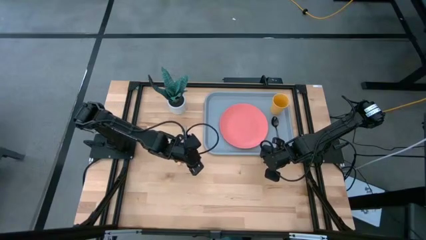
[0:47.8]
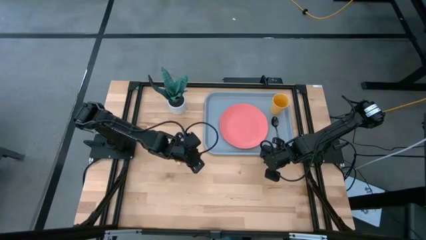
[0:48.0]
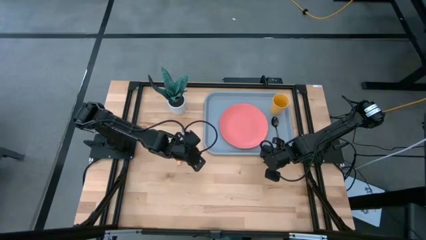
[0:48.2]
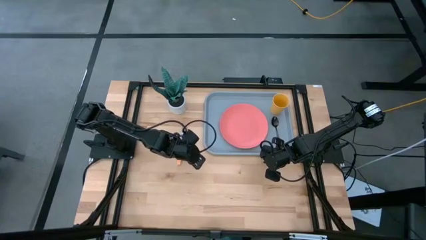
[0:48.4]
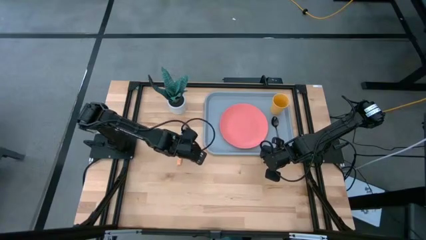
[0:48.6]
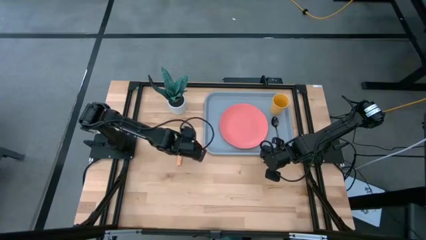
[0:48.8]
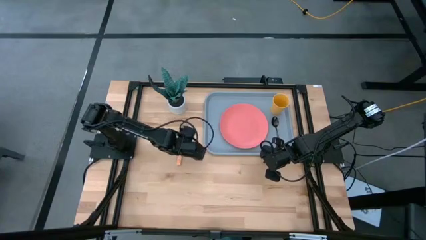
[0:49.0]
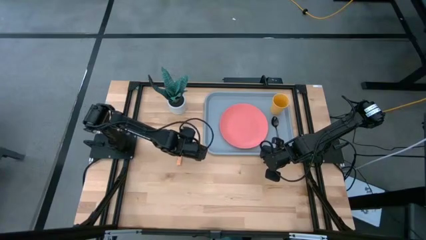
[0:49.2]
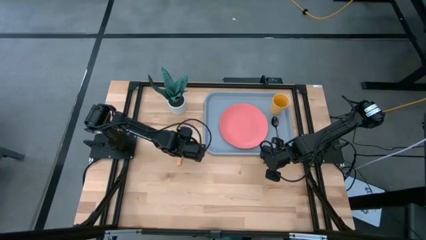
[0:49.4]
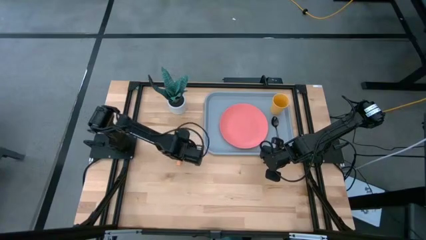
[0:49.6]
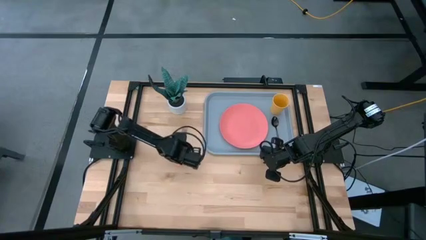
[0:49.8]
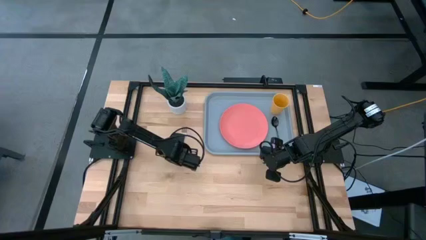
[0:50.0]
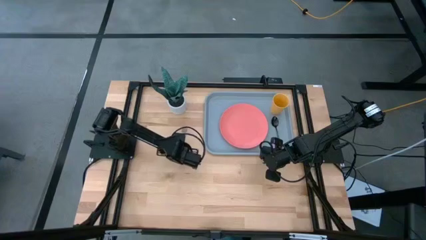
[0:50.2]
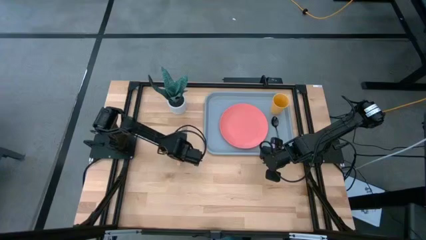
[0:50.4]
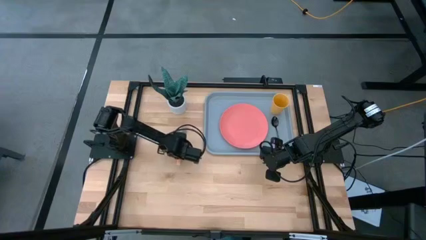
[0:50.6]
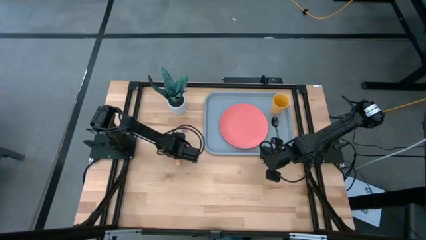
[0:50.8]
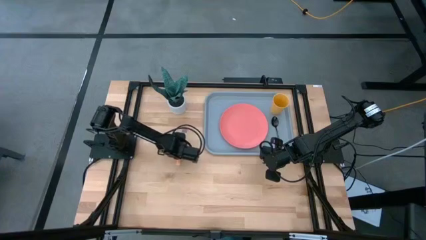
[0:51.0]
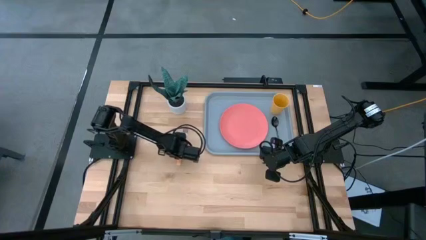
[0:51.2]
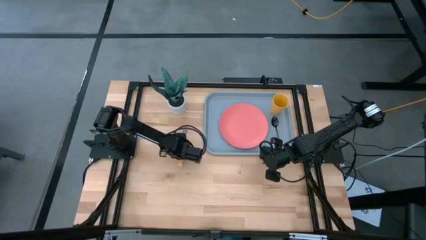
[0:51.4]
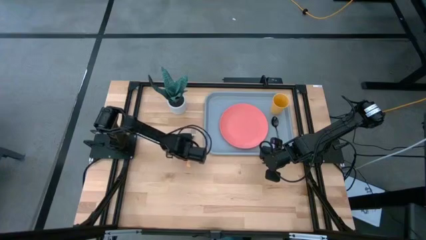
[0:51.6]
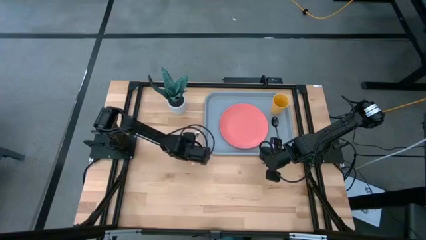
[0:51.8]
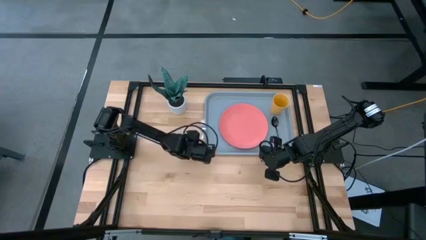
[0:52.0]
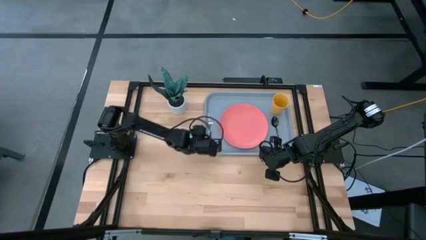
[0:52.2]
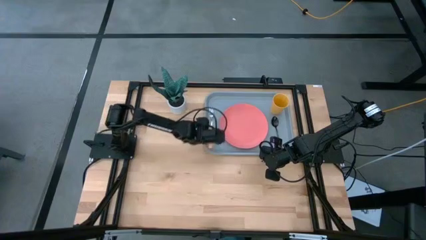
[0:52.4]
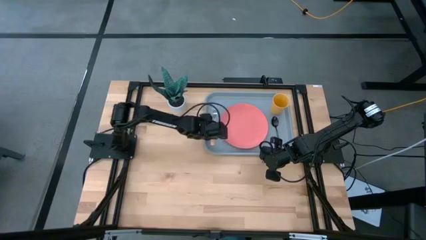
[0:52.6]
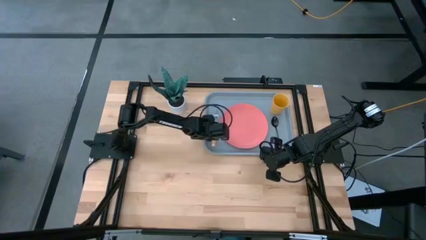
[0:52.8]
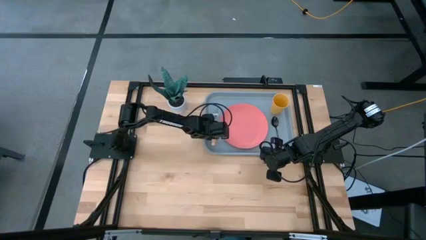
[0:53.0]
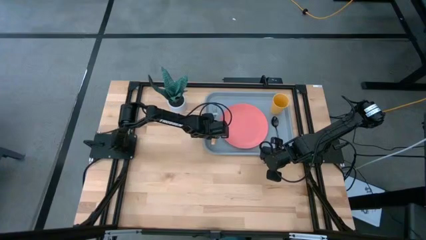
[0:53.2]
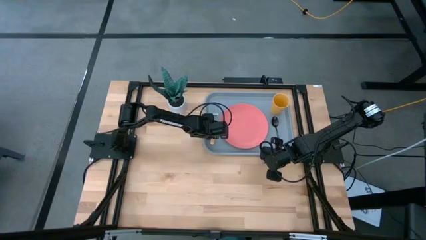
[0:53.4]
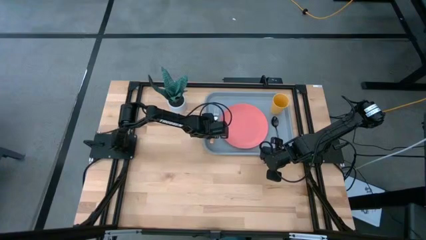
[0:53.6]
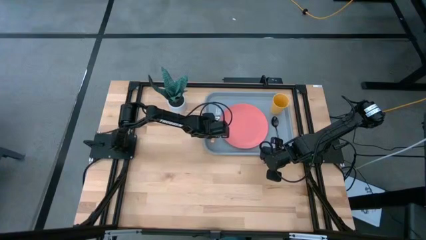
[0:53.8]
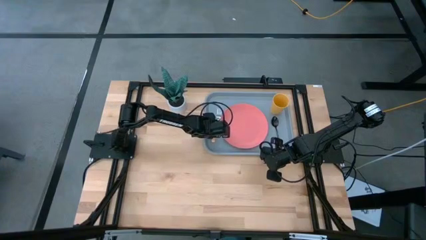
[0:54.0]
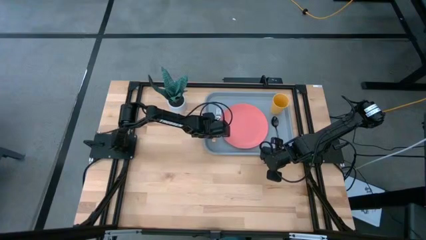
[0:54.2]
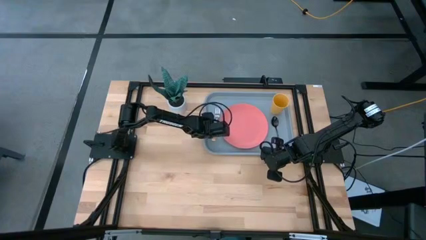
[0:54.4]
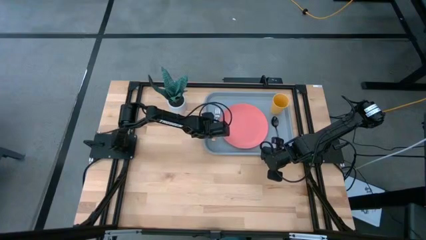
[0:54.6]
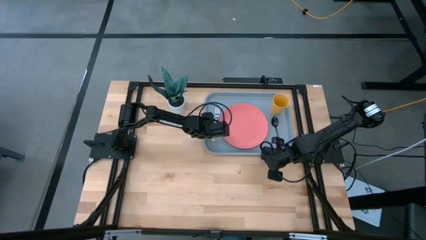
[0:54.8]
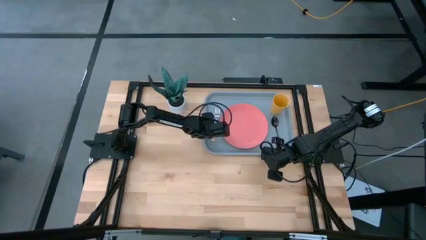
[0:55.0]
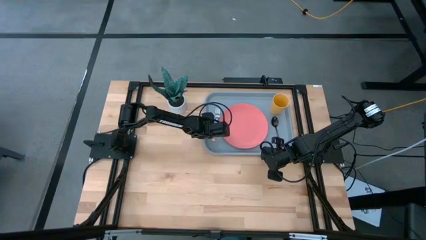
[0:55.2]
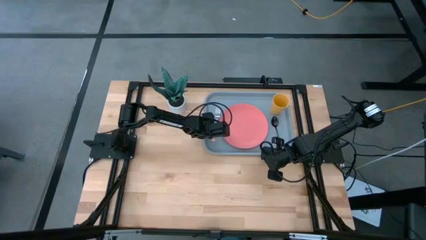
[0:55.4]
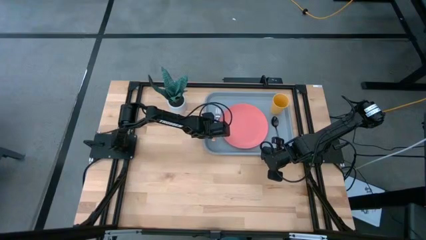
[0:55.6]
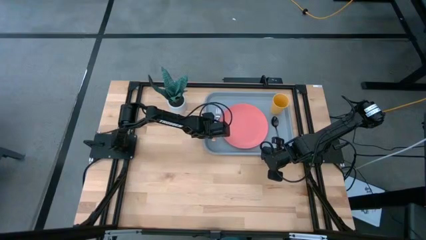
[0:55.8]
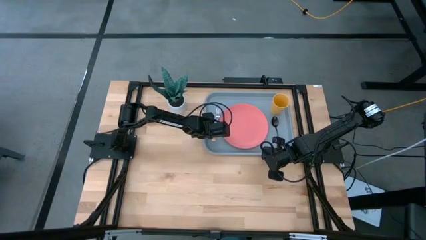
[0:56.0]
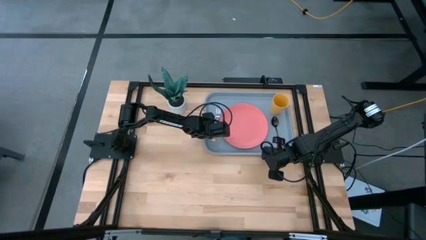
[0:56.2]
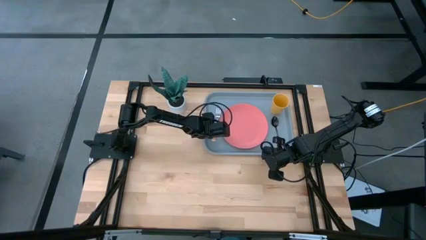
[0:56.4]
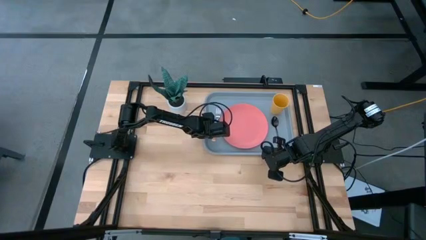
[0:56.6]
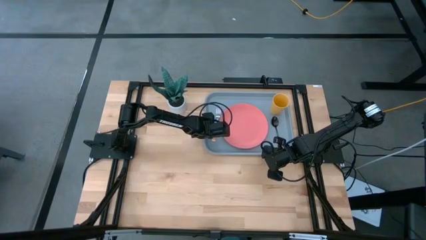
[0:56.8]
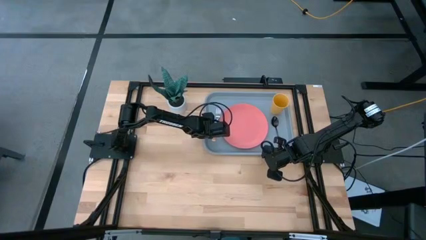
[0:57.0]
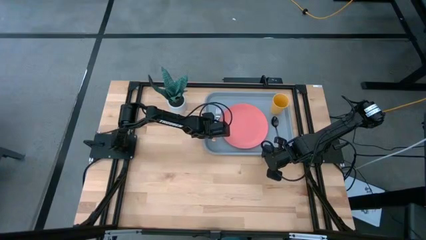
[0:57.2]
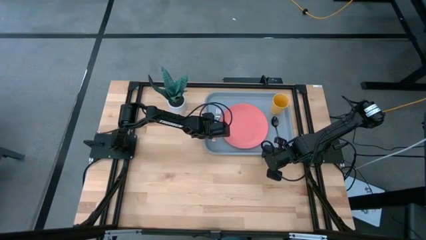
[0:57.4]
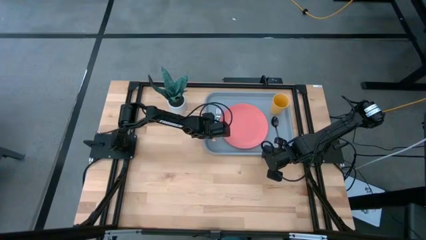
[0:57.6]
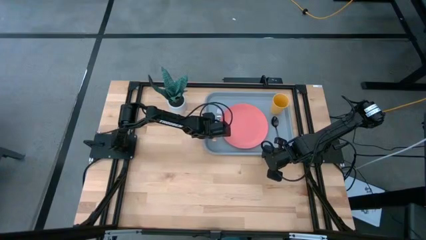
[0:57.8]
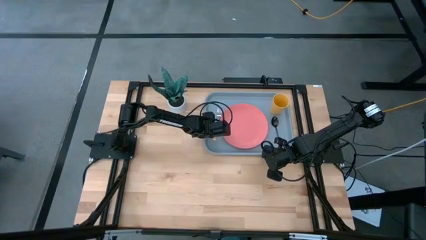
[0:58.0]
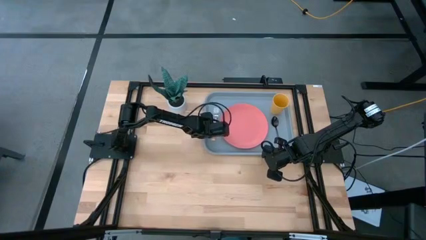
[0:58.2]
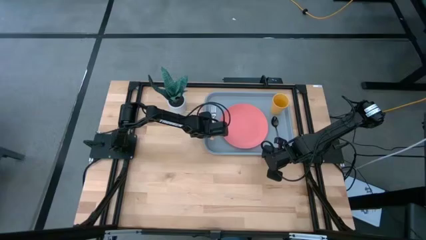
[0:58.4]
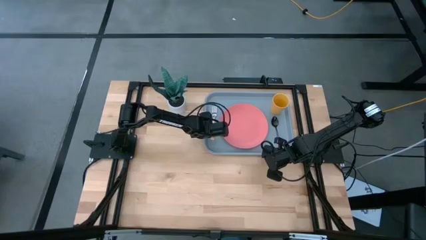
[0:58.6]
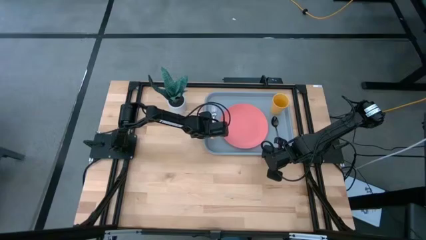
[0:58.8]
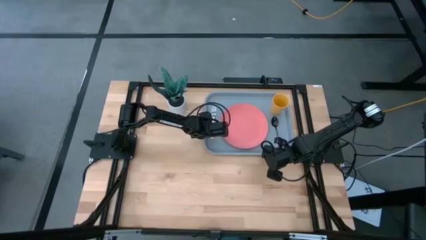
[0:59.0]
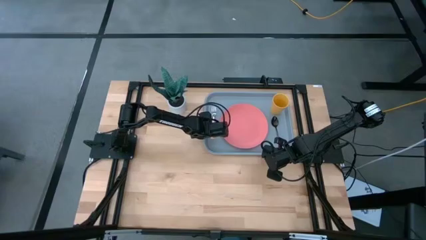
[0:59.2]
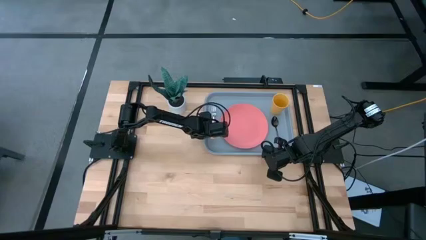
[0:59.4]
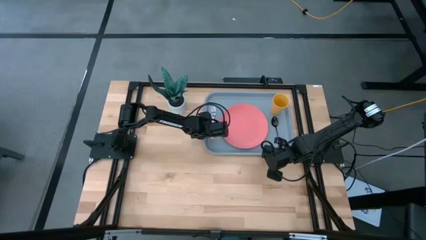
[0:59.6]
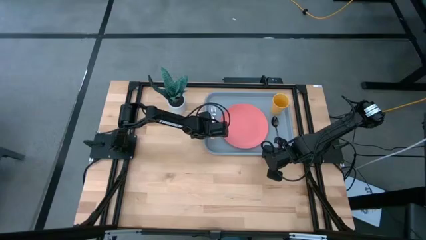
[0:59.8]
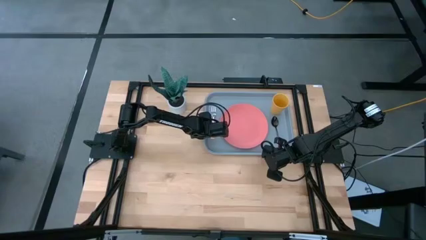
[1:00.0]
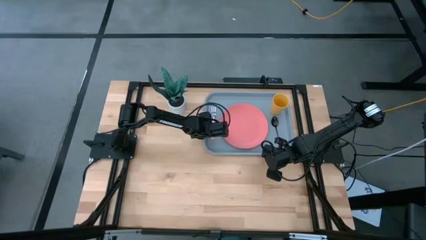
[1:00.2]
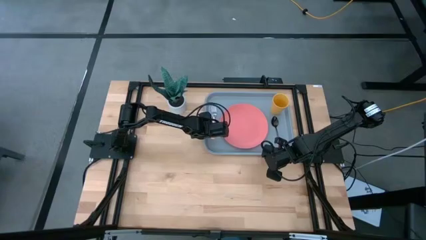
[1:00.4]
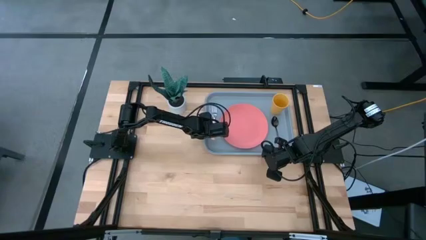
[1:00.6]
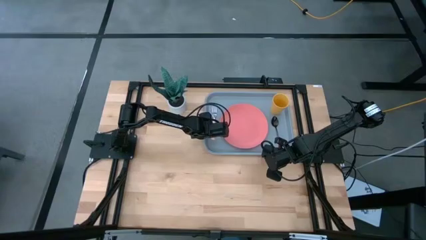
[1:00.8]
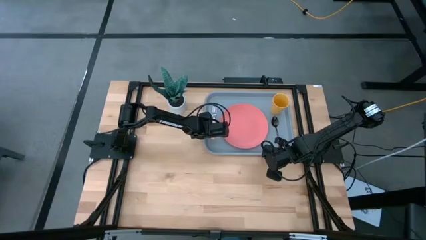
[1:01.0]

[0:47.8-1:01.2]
Task: Pick and place plate/cup/fork/spoon on tray
Put the orange fork to the left of the pink plate on the blue serving tray

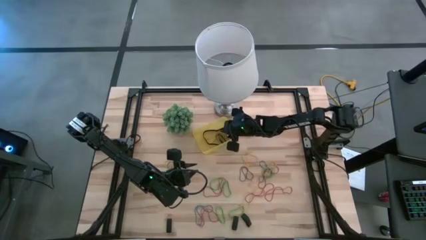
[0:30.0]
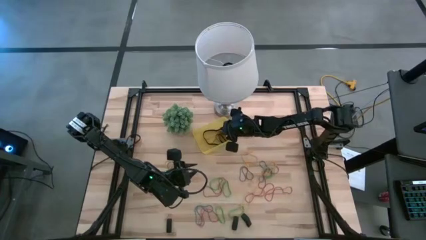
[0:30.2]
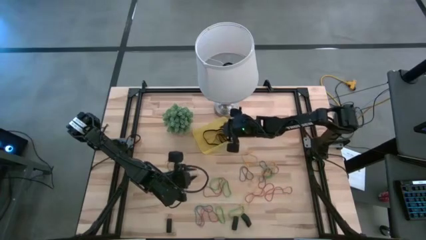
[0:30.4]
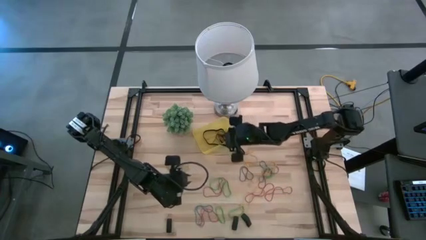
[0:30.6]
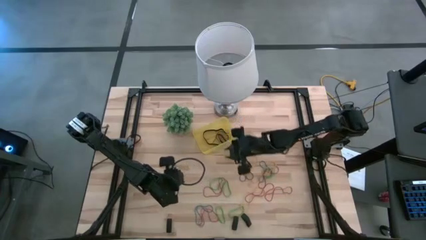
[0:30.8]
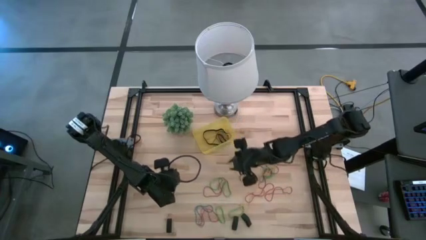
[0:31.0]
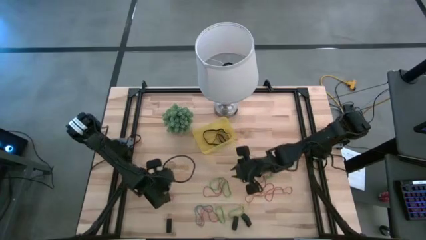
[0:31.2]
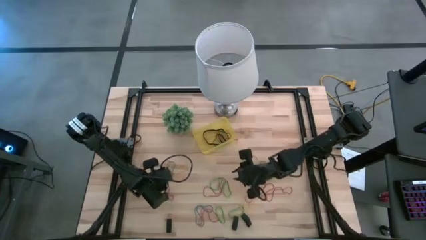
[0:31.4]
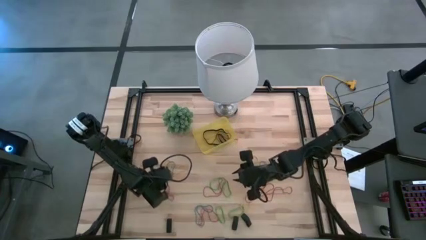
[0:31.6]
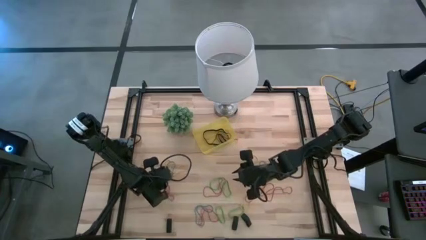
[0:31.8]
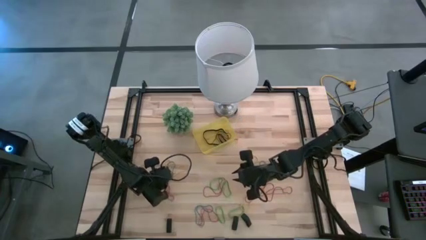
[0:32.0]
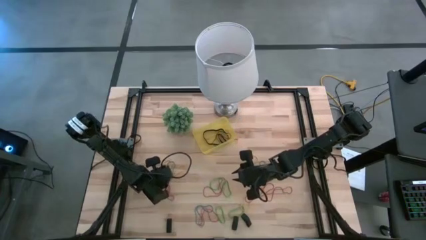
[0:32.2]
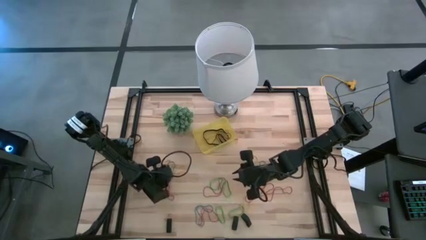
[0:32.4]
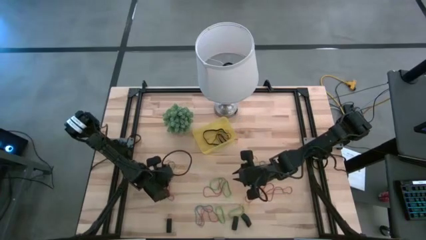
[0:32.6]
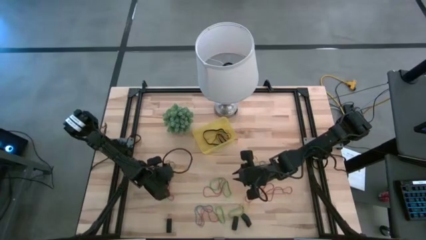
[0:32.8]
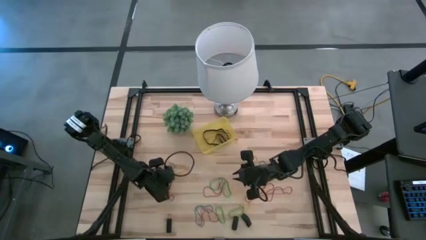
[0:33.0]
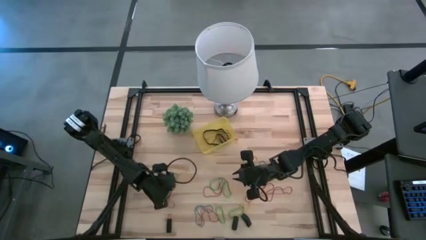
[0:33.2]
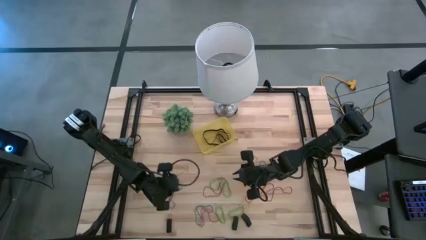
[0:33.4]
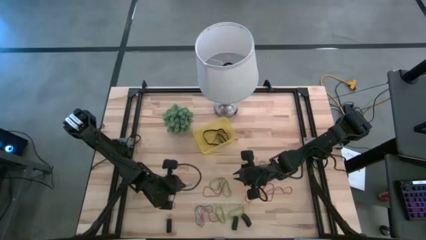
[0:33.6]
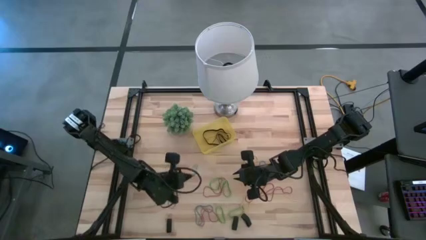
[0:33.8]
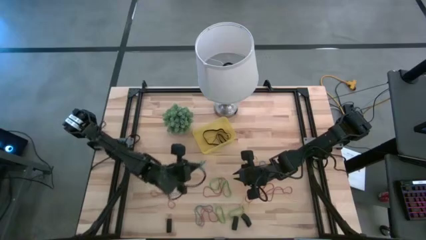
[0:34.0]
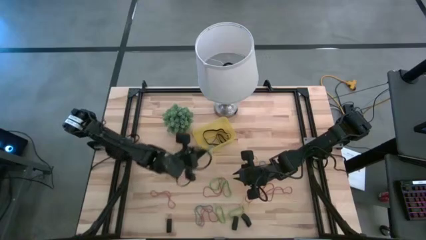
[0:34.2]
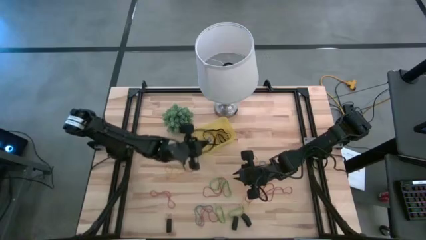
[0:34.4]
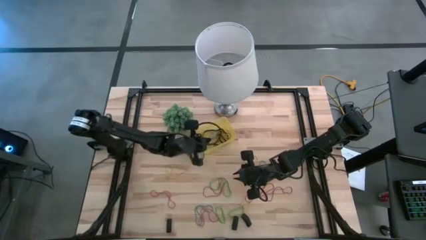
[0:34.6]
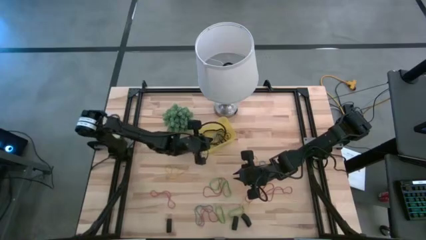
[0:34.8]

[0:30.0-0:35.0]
Task: Pick and place rubber bands into bin
Put the top left blue rubber band into the yellow bin
